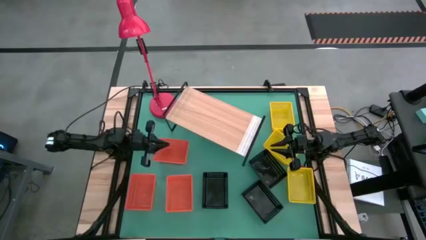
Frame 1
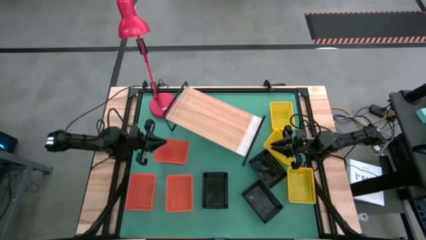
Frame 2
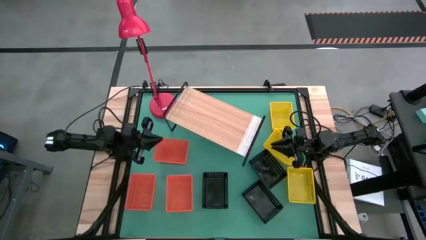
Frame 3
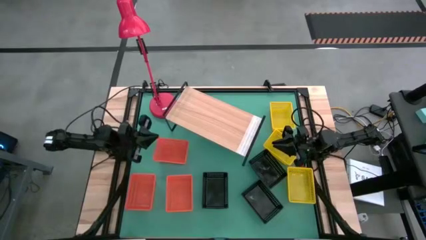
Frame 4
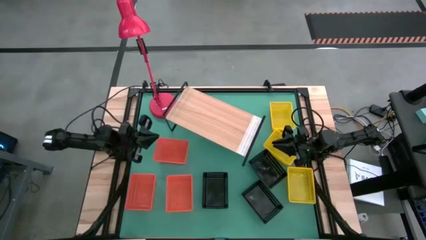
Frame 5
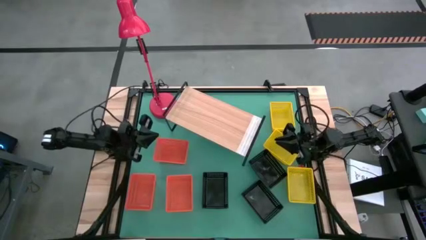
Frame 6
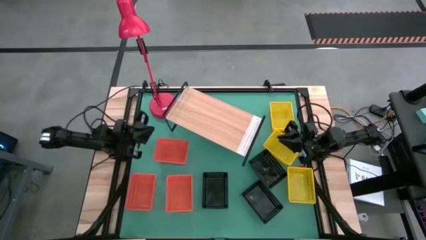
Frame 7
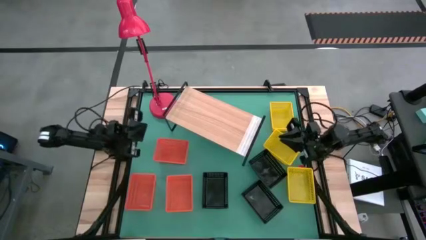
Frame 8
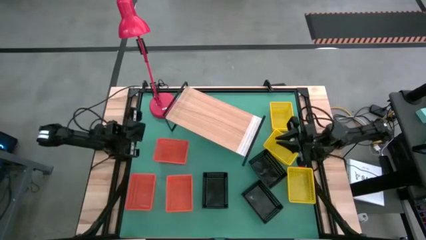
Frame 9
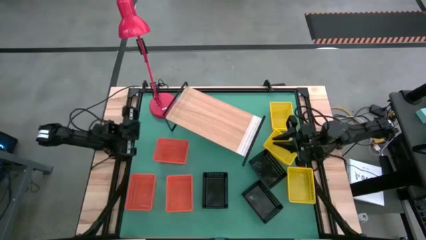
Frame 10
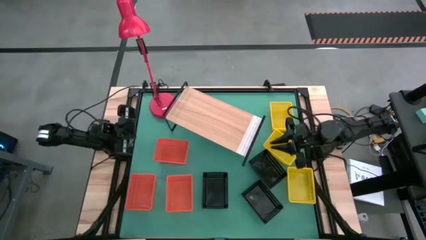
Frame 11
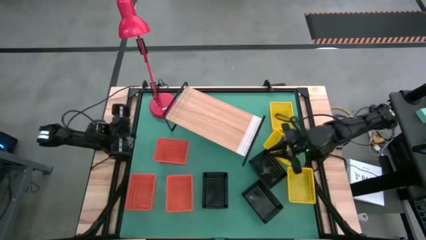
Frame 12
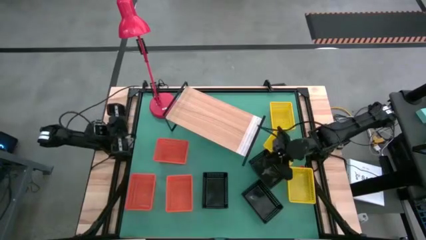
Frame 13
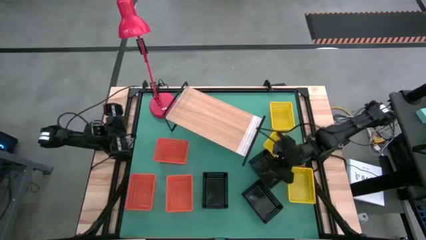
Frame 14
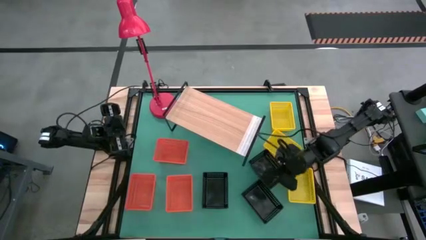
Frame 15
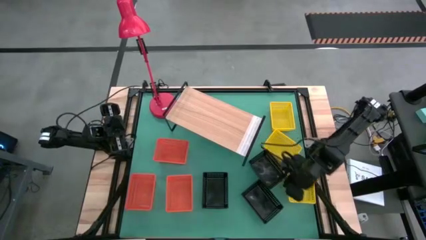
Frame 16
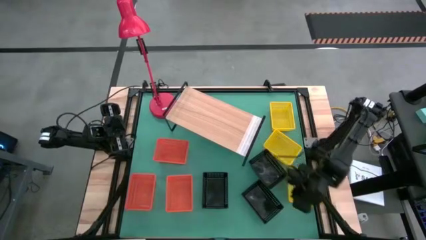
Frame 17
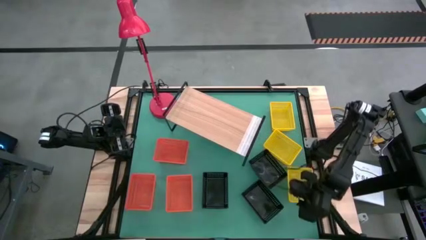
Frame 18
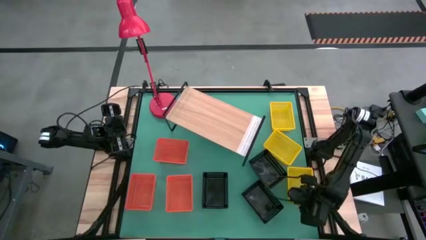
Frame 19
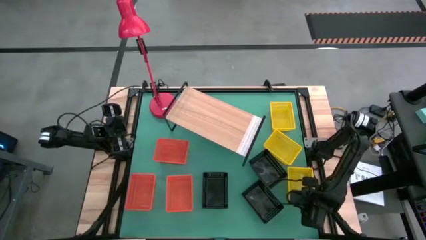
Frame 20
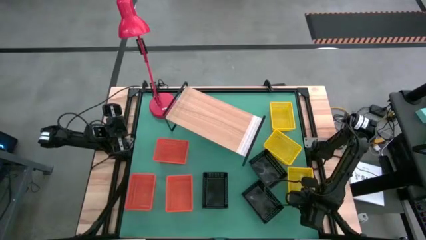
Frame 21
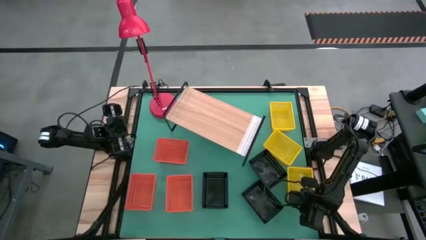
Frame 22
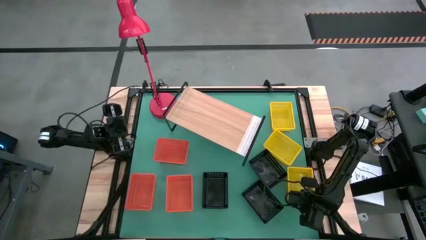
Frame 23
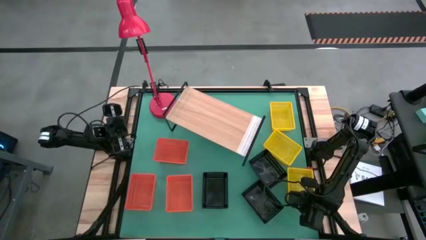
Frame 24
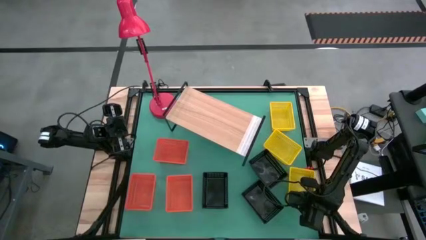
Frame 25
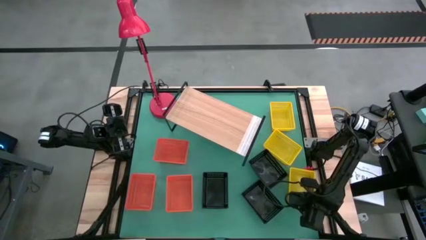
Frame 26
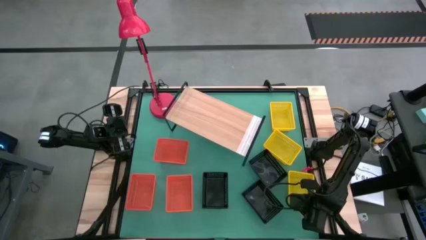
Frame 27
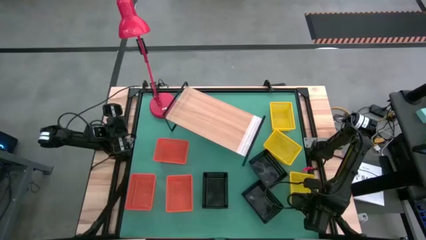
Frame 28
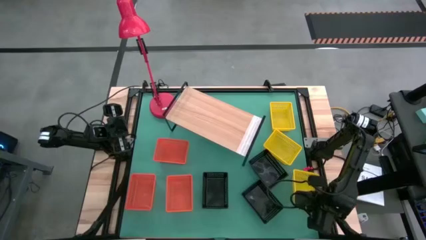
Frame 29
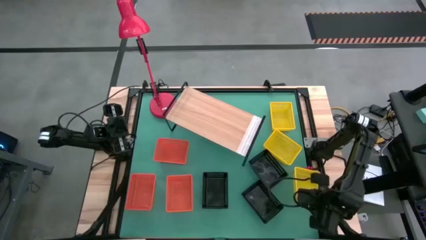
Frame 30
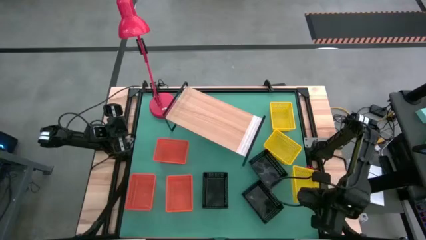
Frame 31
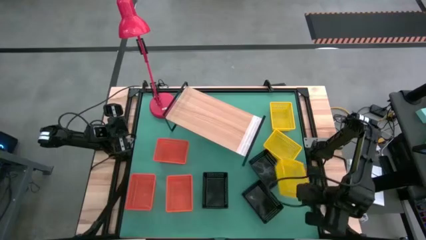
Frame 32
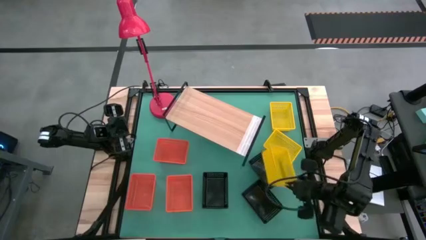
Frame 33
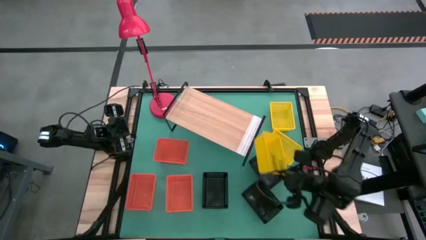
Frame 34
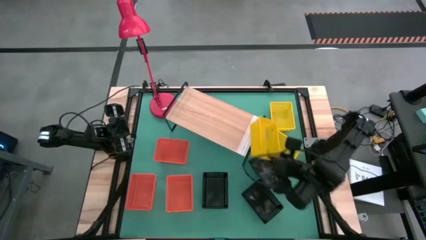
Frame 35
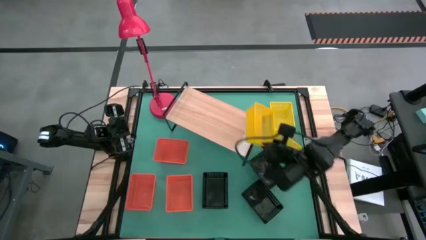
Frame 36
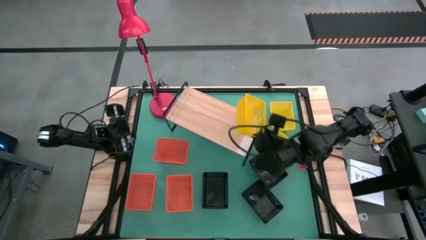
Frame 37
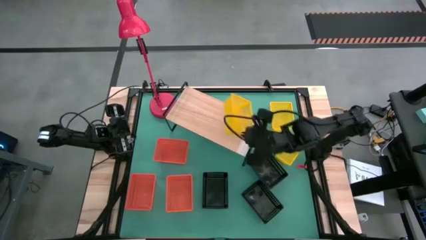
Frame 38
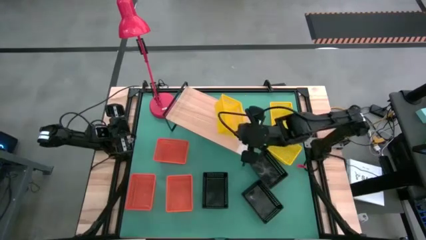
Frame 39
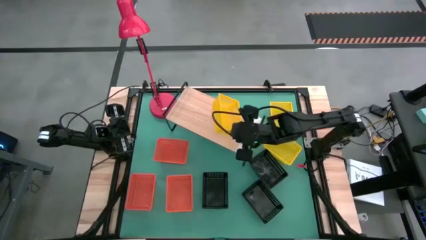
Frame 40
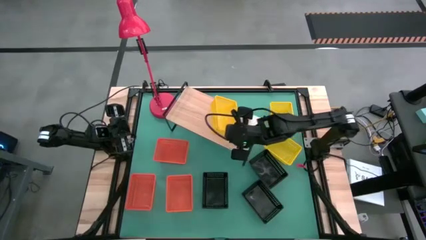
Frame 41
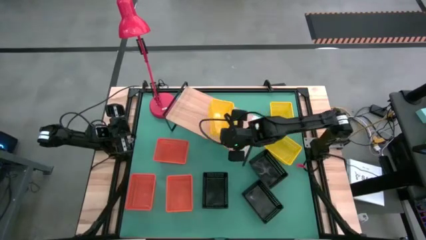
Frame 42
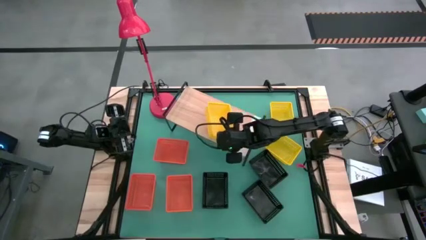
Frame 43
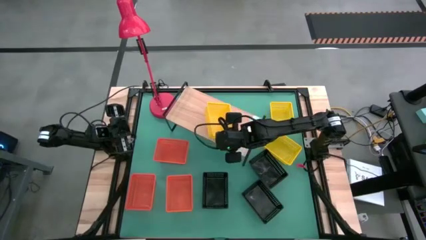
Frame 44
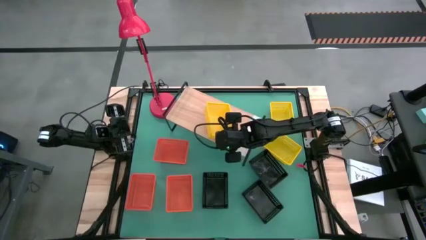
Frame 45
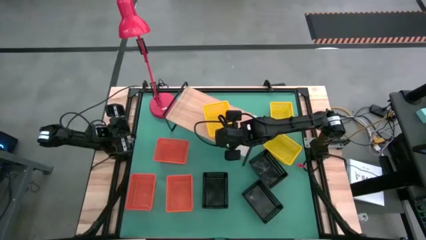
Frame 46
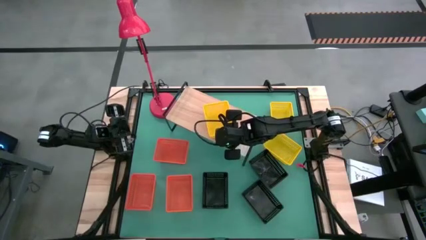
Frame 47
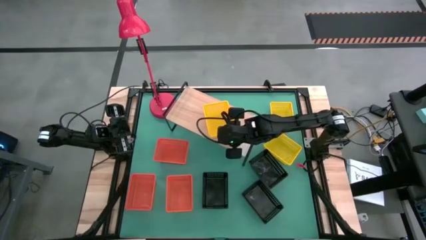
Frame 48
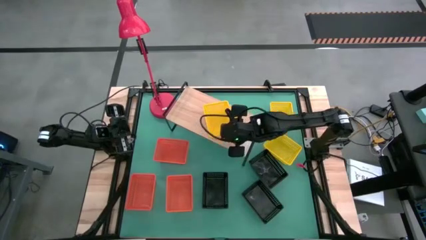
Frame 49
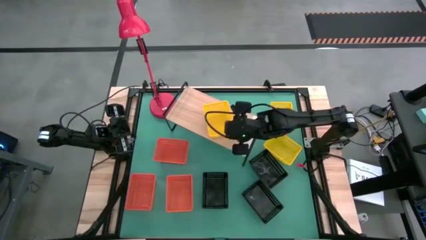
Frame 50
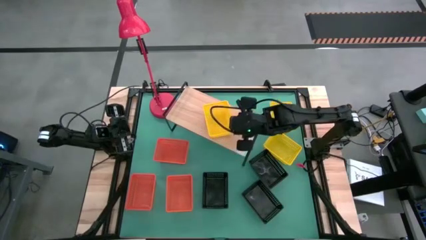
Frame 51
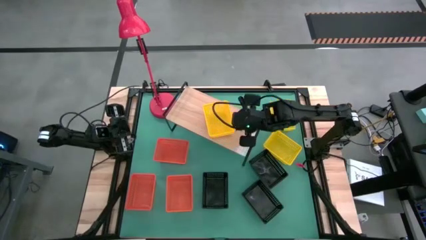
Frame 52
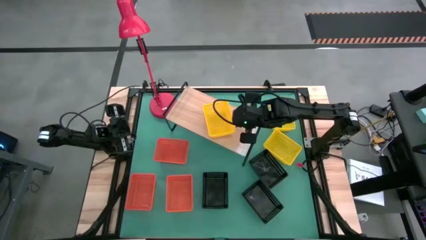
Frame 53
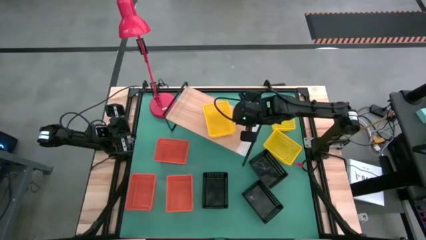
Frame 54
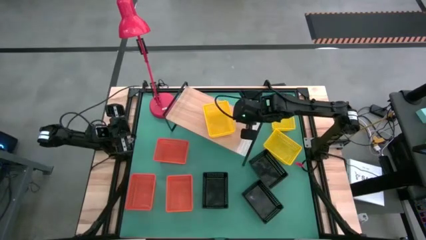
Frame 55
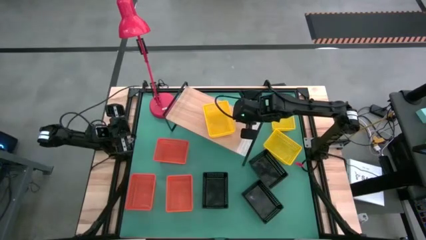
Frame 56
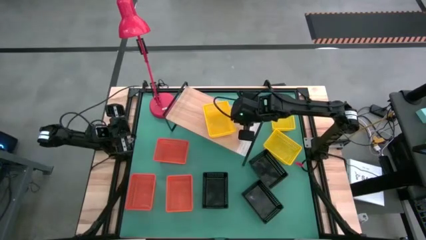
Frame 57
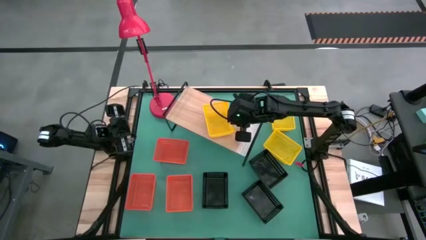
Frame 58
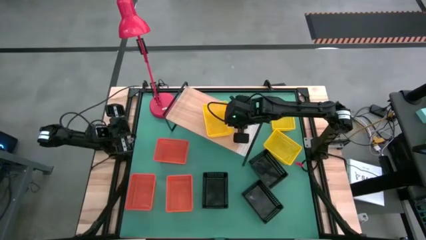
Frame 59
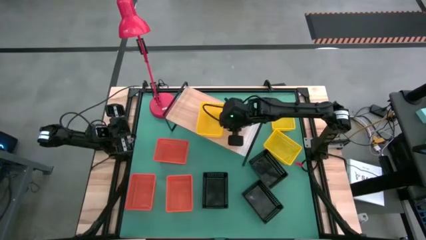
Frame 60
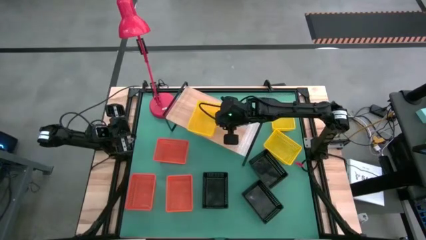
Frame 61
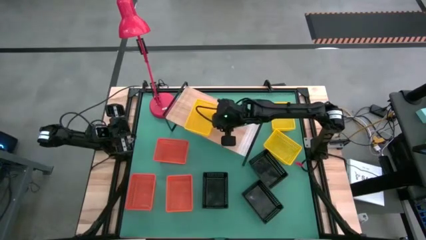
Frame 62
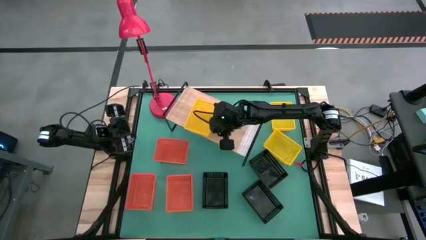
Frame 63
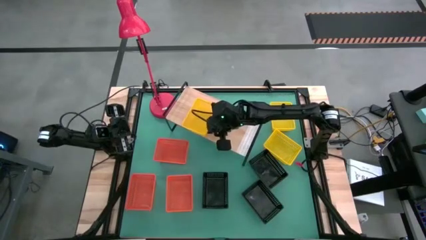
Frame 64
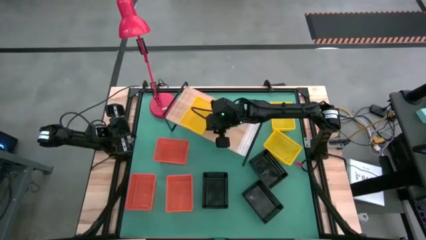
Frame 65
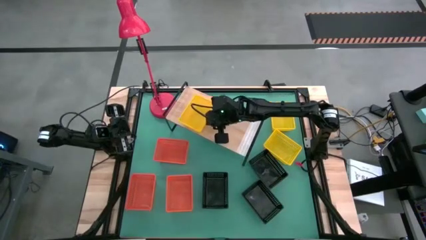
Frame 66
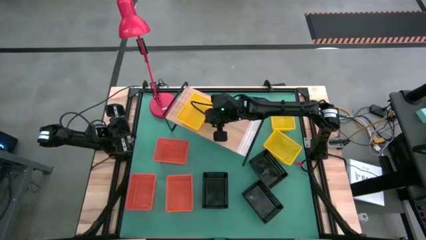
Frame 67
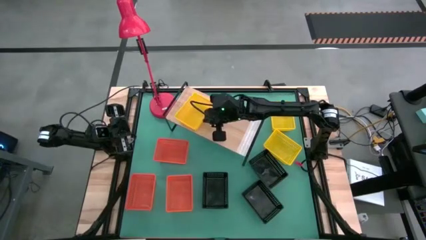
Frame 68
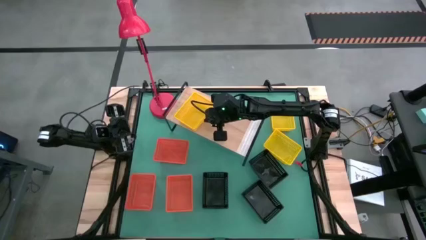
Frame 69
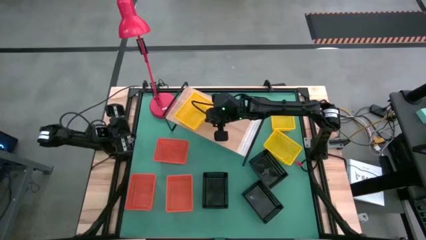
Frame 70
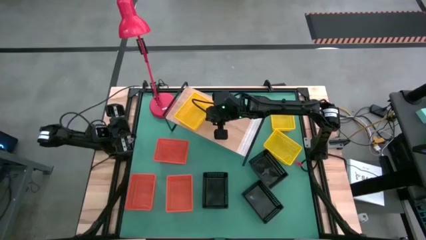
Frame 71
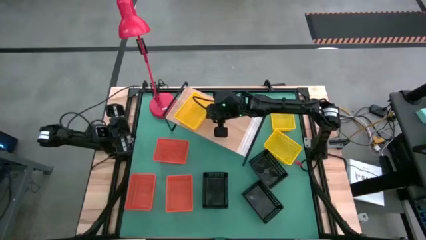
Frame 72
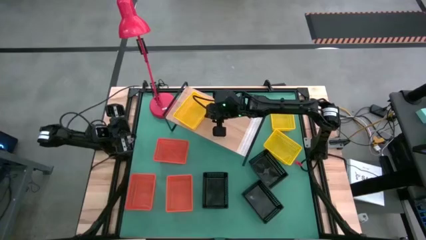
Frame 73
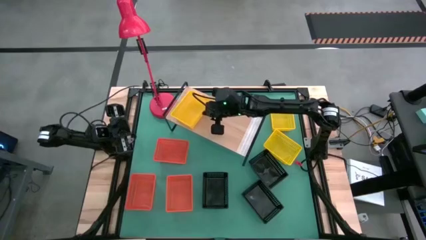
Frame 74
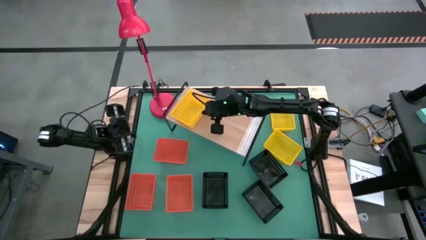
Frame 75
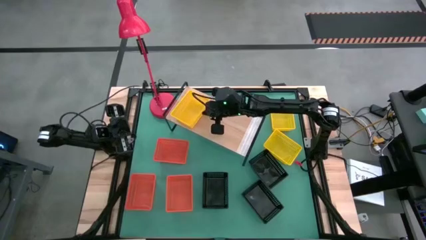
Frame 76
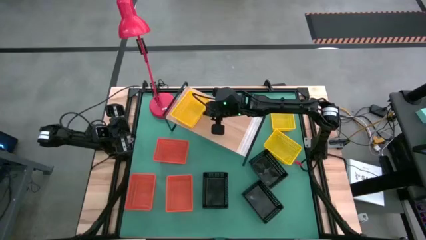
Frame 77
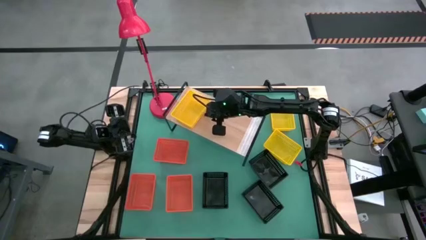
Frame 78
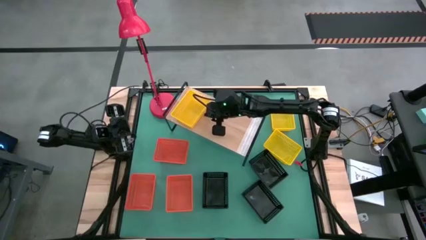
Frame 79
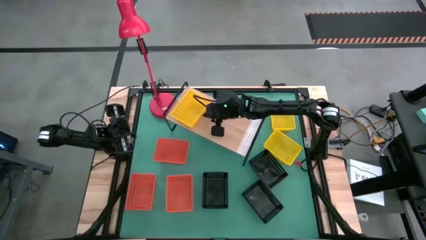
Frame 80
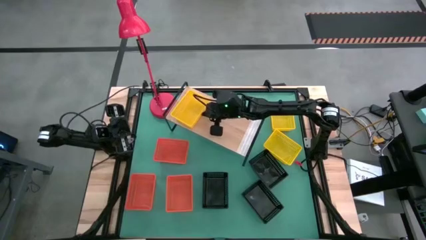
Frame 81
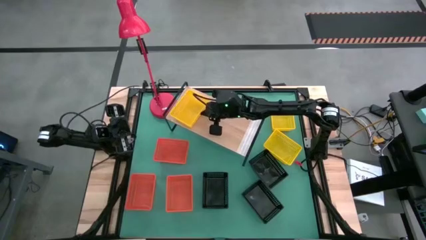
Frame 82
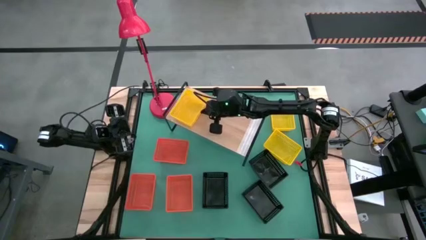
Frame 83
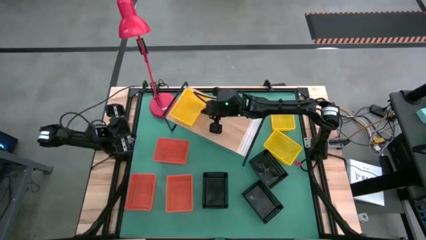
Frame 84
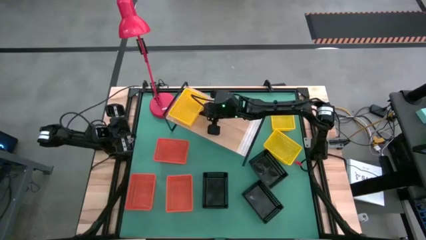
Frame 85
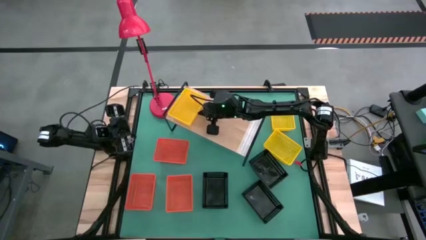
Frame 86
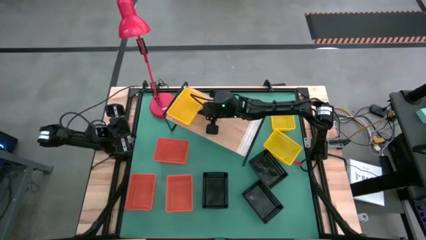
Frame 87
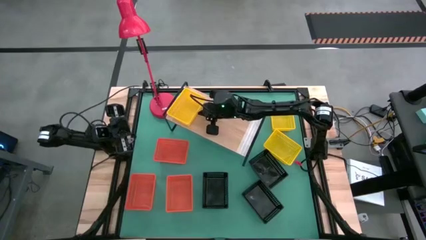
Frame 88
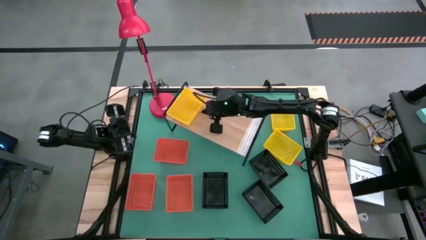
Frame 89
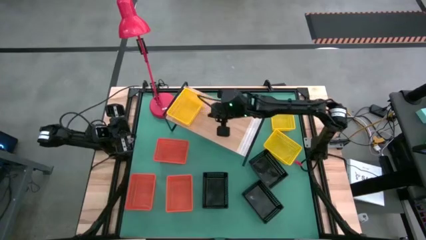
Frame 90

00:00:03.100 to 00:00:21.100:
Task: Stack baskets on shelf by color
Put the bottom yellow bin on the shelf
